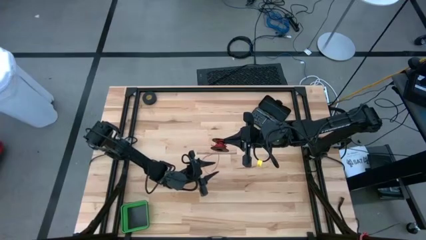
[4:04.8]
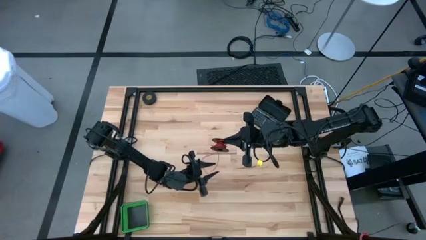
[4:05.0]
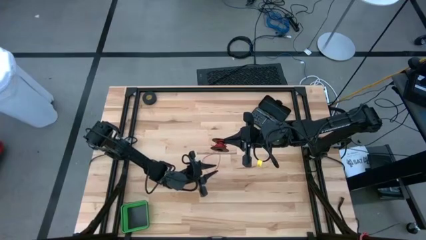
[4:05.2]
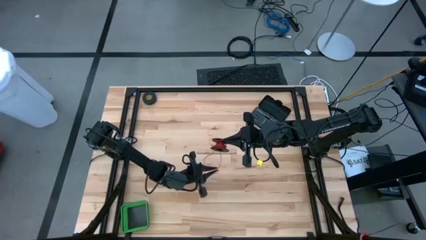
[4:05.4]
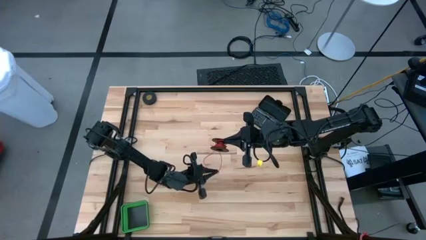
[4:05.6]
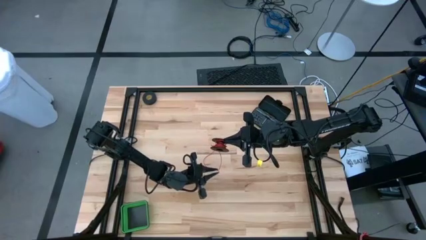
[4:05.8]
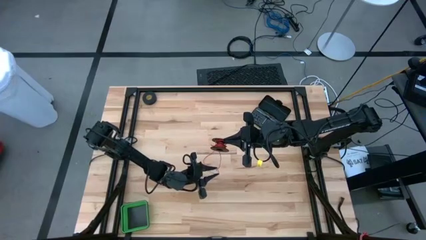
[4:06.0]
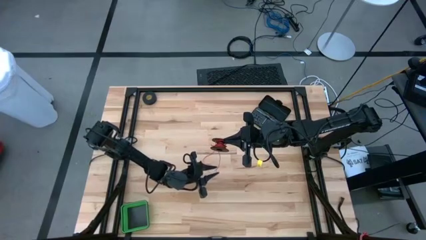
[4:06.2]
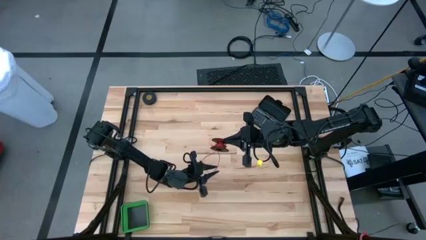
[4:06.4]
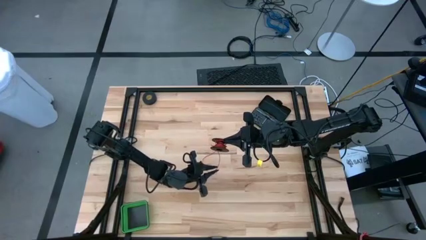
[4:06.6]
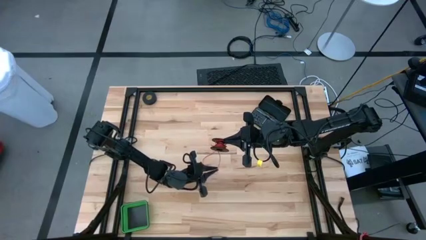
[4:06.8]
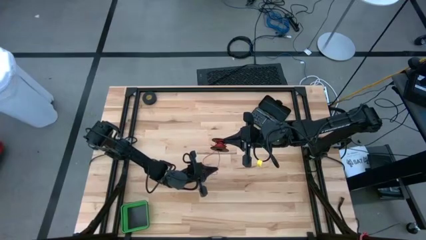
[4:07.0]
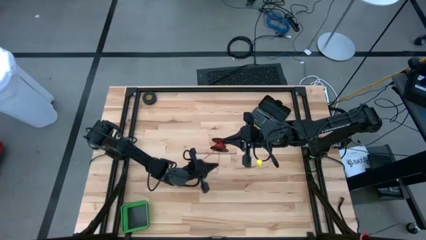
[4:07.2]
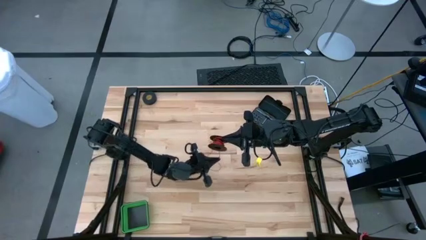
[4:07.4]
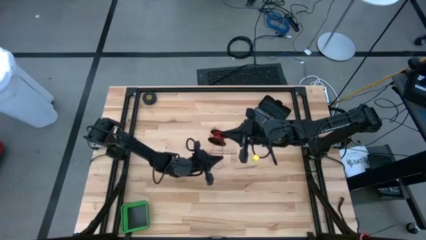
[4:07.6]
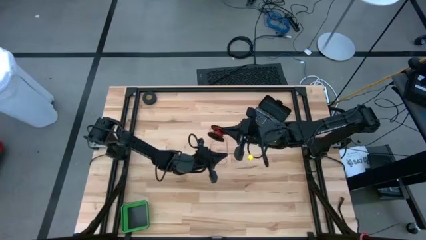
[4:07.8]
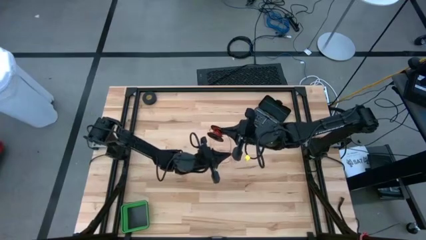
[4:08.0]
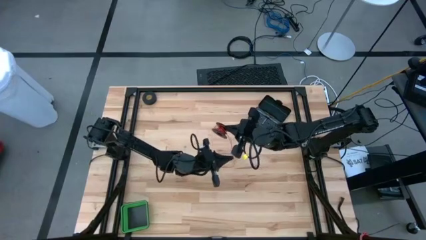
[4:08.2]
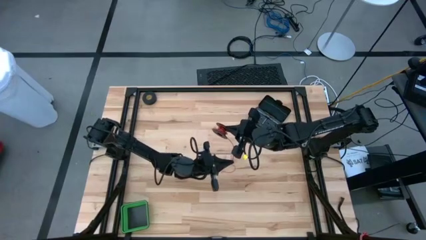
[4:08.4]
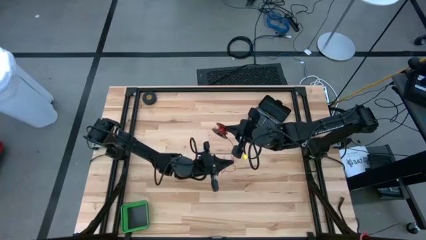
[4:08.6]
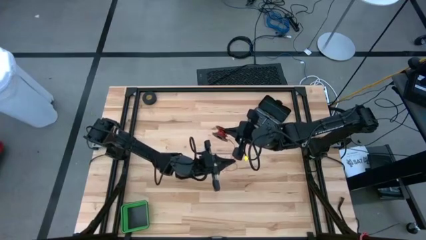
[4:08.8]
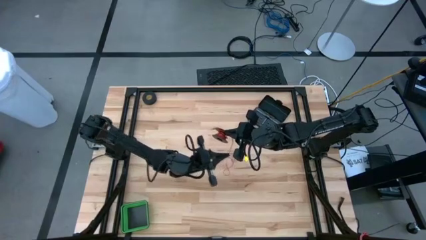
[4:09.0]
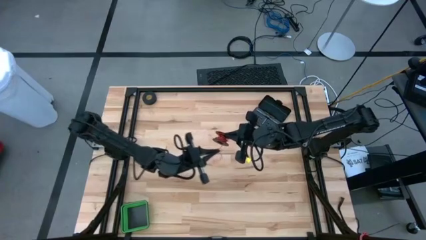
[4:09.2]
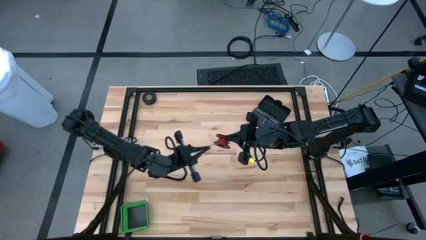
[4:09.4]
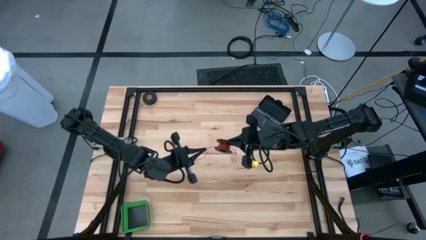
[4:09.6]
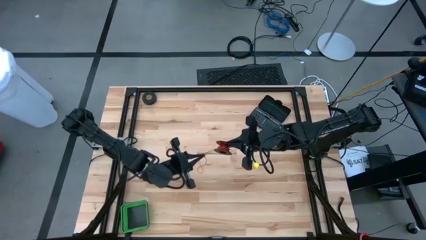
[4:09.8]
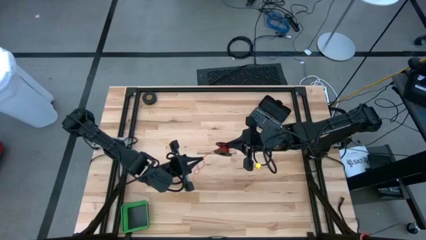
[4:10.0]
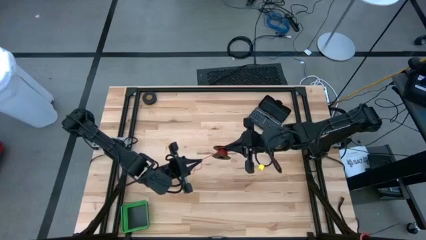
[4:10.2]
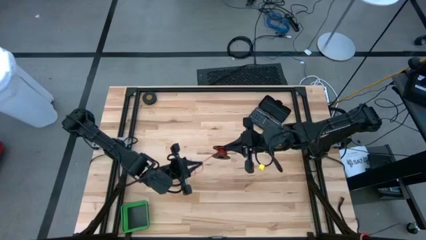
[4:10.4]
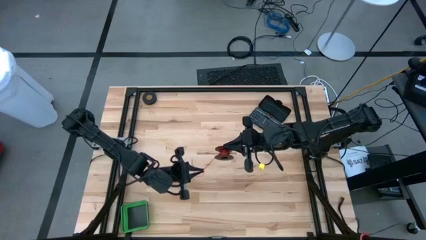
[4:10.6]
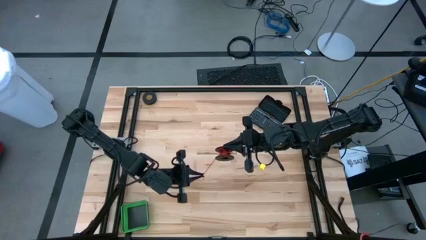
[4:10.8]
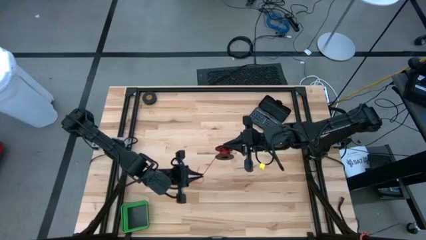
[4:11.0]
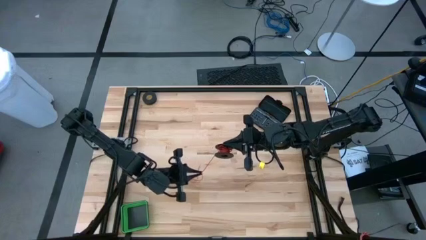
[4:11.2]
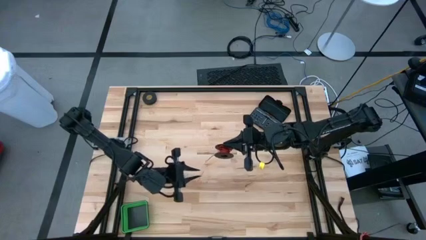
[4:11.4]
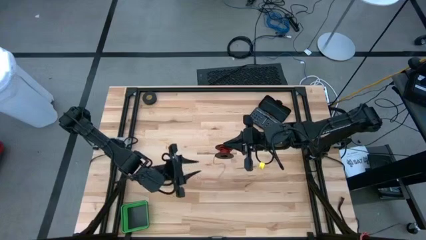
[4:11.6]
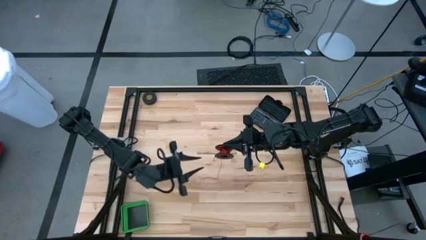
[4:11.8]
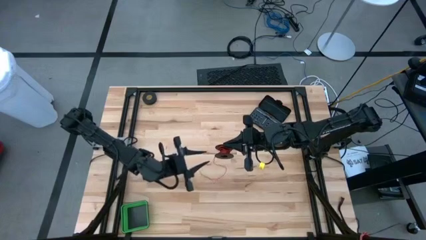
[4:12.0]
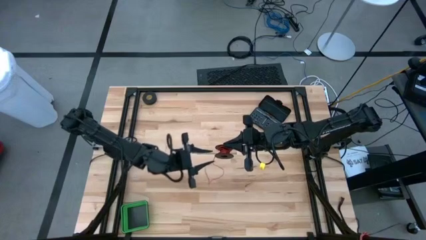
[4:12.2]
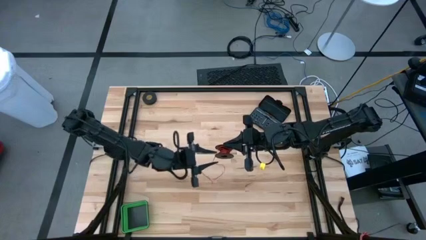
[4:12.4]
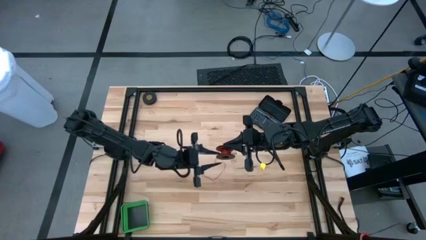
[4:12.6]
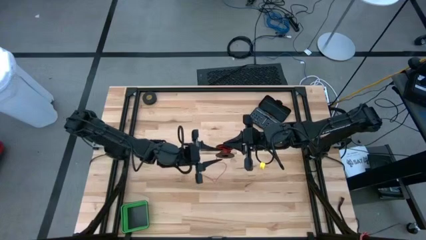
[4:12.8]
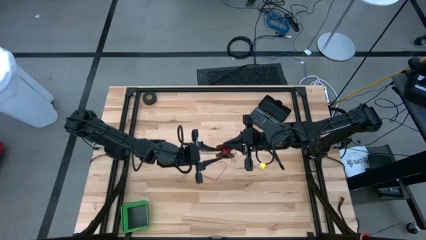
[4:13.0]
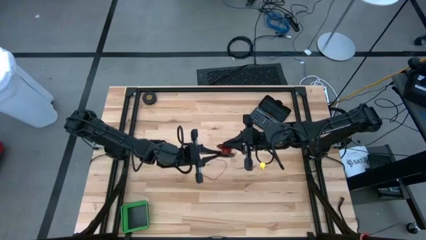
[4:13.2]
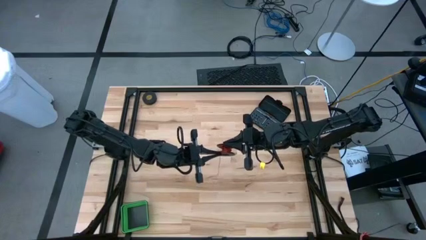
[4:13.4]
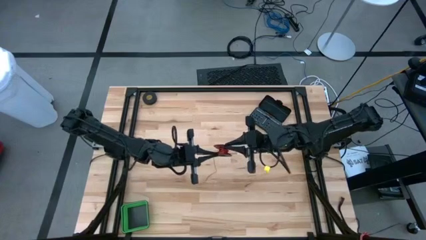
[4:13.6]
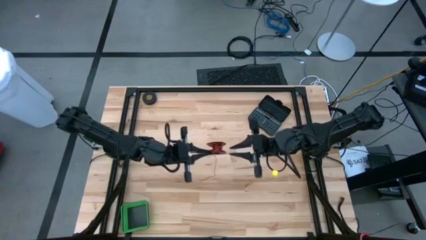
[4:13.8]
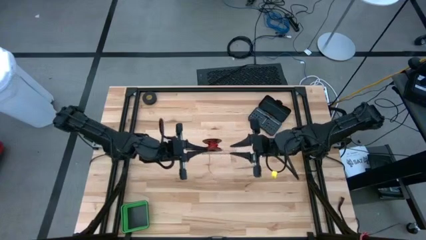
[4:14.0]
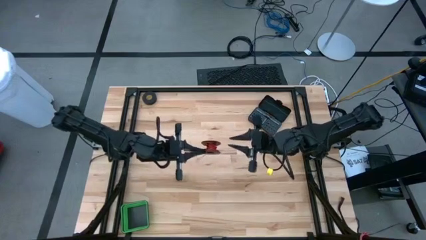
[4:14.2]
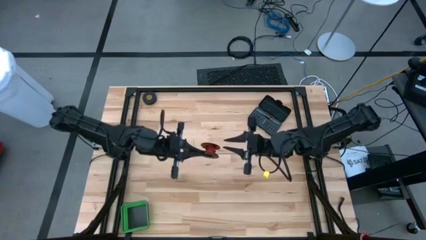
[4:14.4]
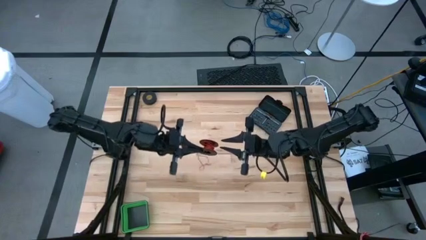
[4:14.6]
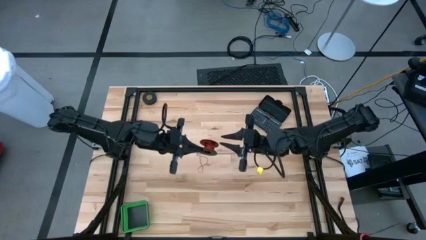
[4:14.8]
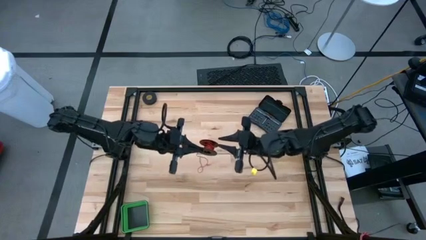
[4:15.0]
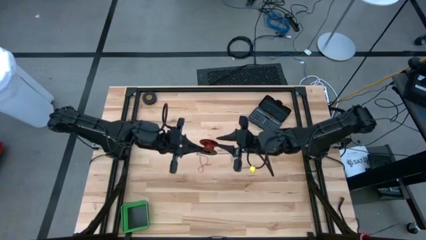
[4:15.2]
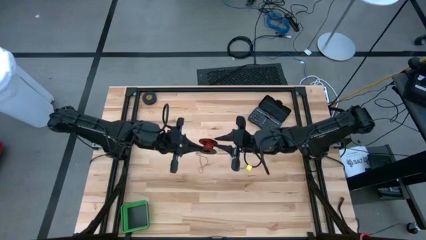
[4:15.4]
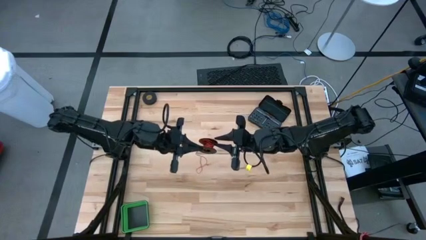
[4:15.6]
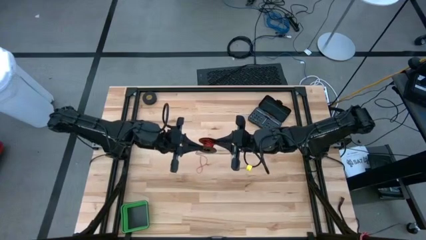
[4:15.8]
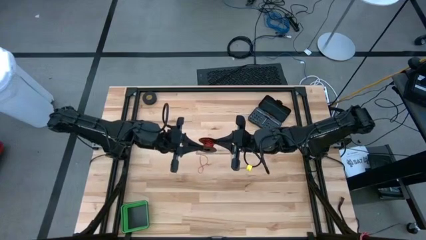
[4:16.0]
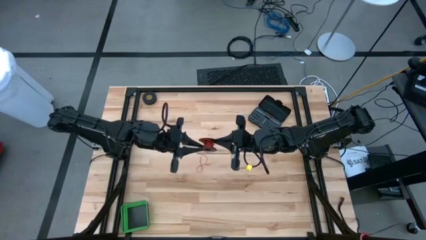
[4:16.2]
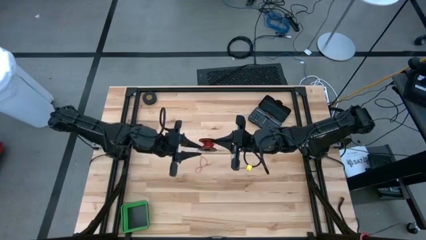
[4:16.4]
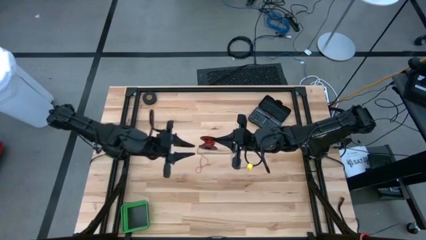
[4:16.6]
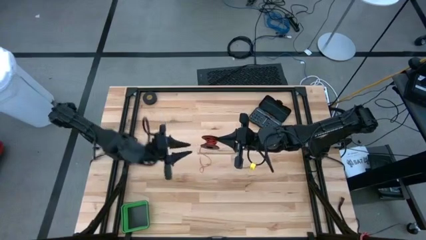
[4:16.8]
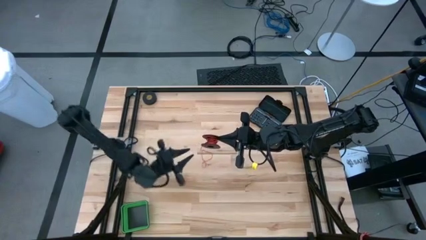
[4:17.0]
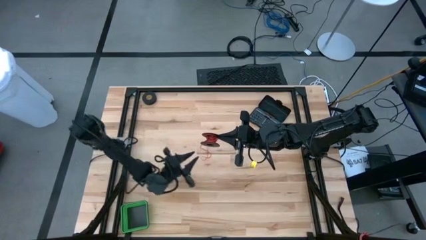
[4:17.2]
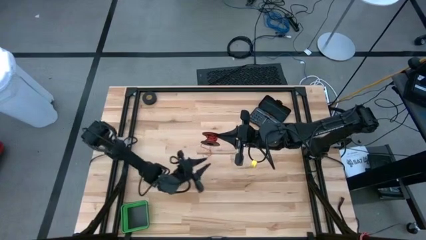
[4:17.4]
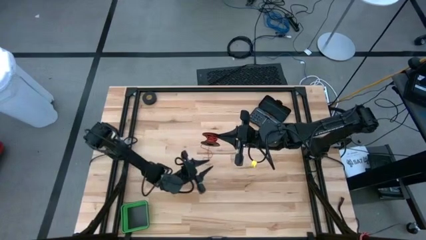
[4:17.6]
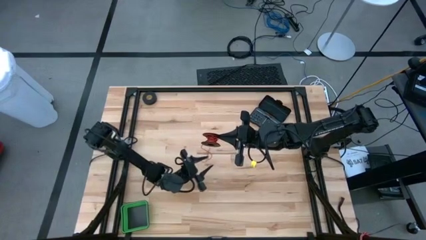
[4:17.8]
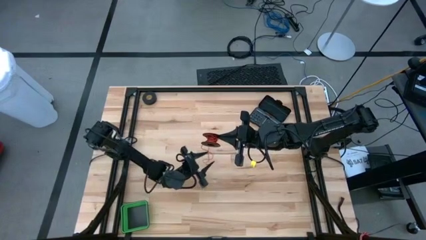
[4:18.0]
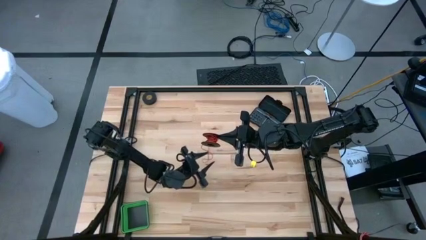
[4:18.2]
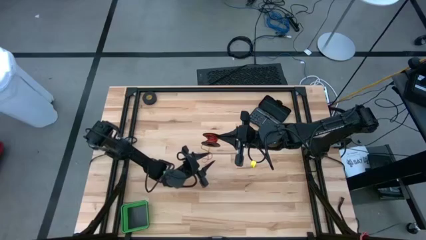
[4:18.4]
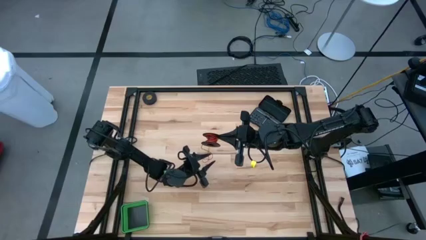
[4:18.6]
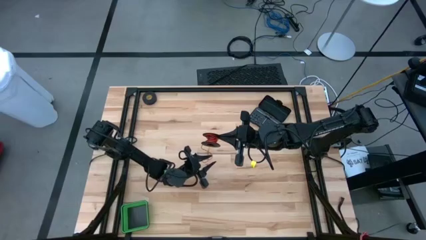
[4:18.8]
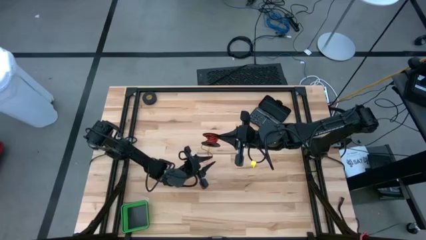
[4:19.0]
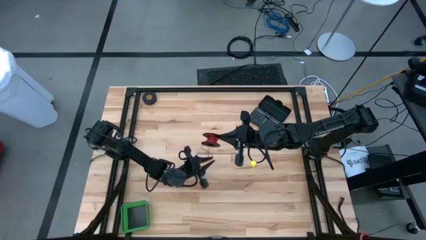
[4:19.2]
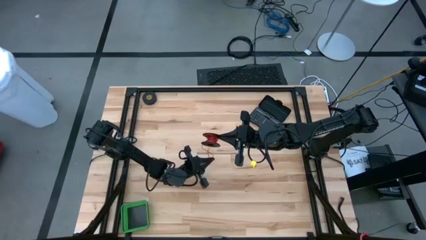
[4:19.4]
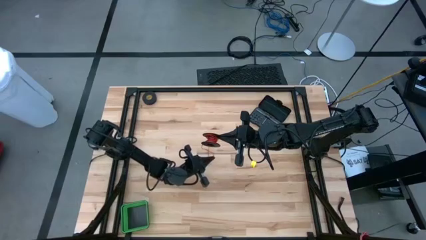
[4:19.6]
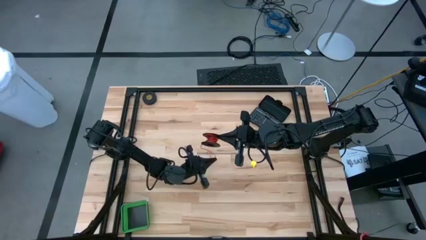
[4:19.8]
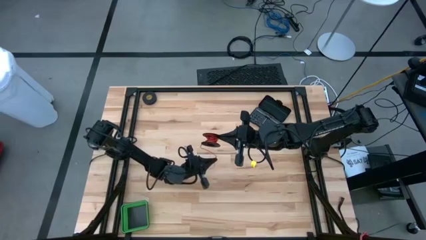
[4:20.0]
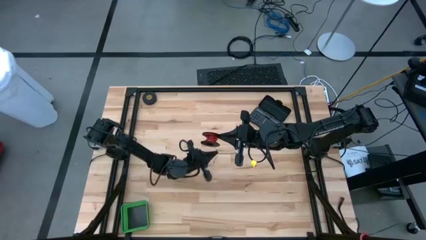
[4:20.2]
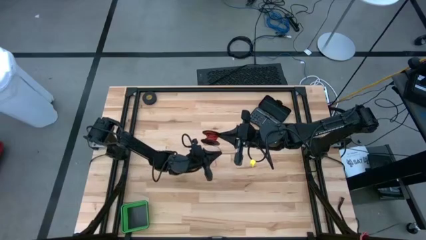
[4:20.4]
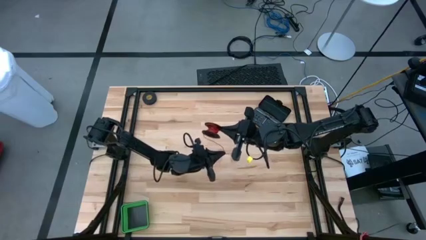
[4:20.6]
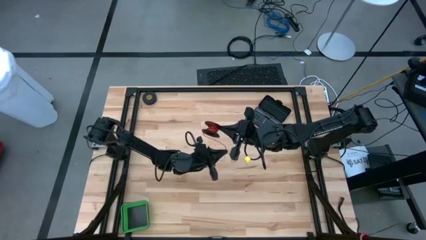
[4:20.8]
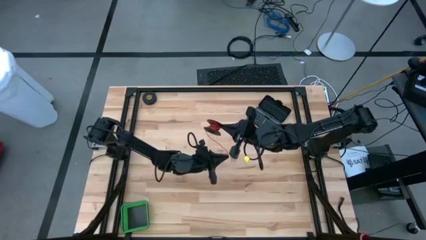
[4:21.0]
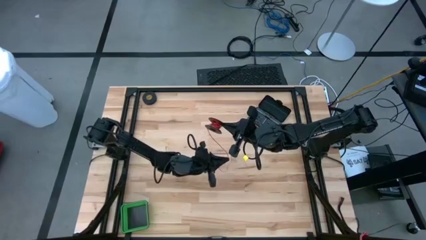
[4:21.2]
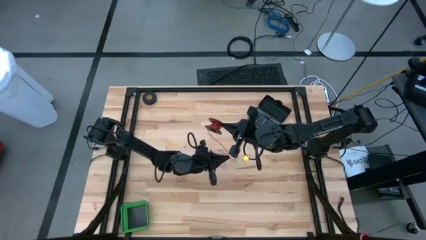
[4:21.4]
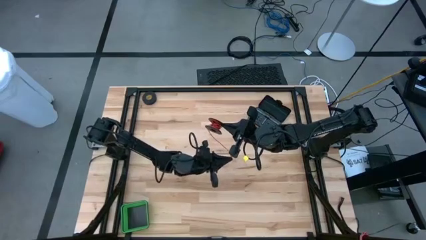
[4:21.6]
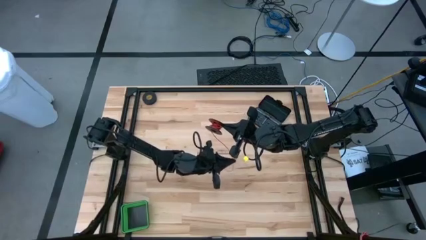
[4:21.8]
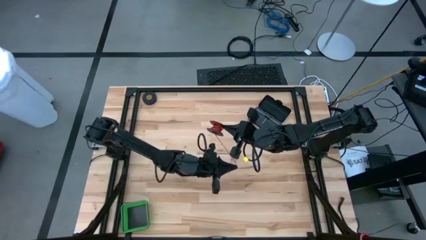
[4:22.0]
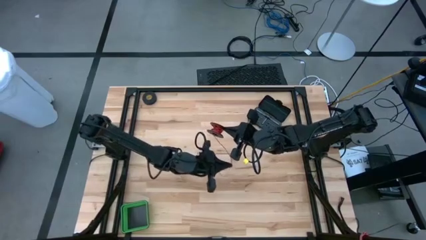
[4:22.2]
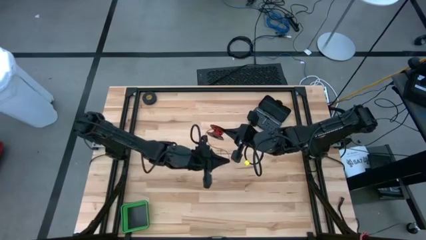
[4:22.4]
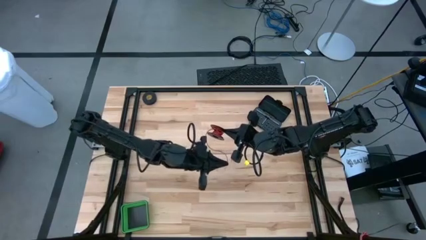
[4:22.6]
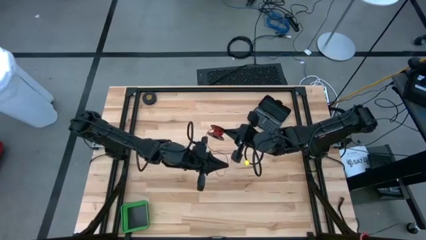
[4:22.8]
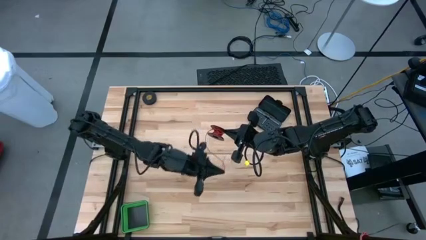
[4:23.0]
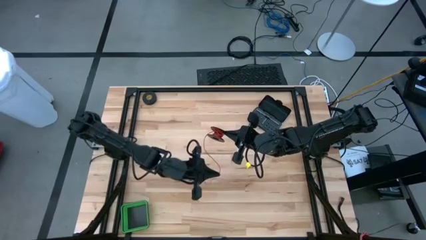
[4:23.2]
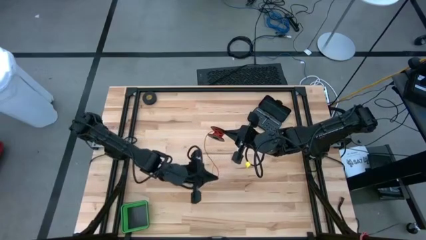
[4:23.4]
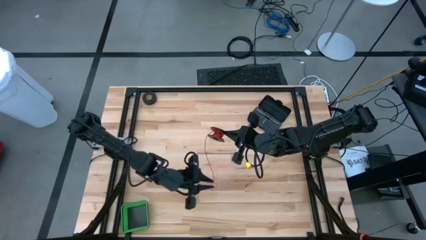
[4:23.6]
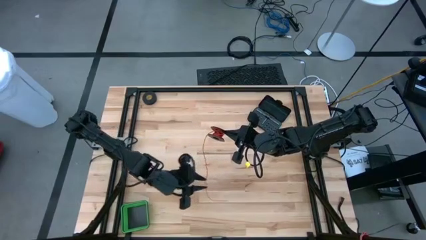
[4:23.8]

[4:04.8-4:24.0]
Task: Coil cords
Coil the red wire into the spool
